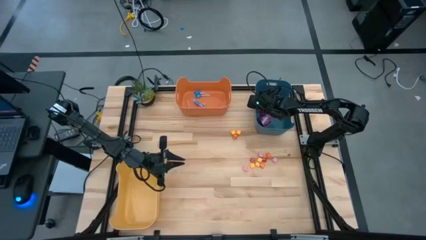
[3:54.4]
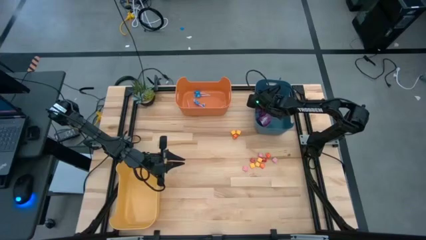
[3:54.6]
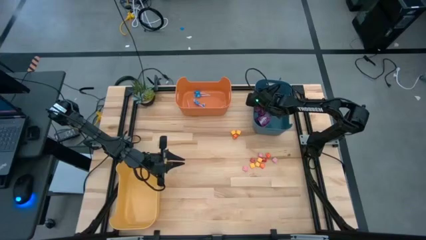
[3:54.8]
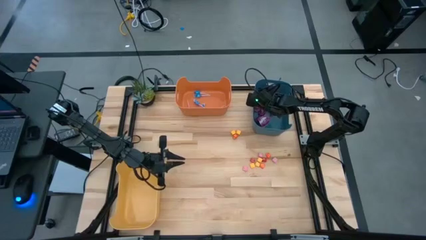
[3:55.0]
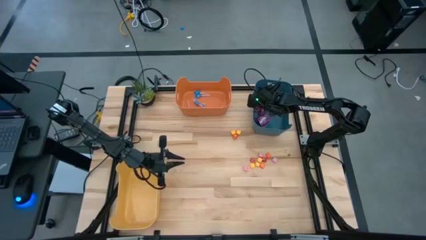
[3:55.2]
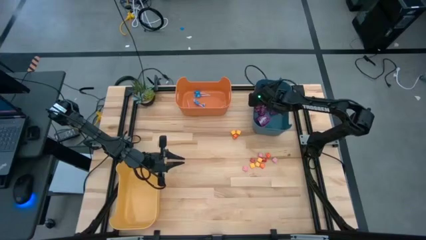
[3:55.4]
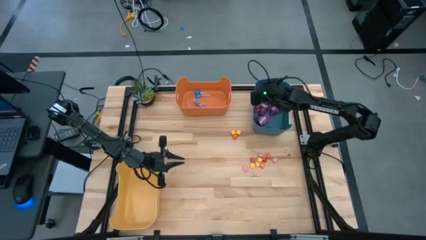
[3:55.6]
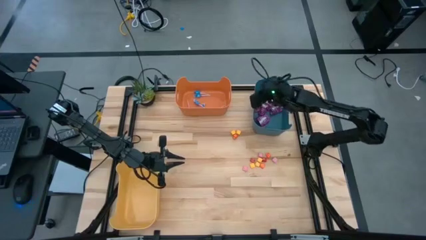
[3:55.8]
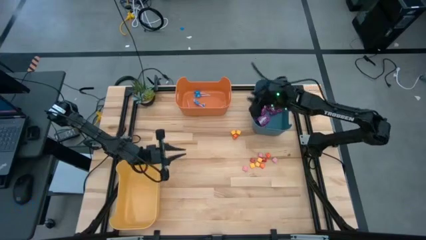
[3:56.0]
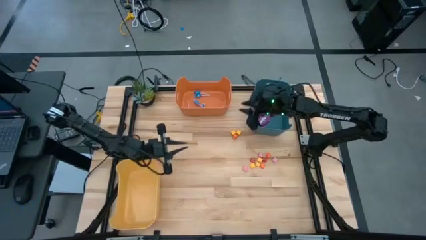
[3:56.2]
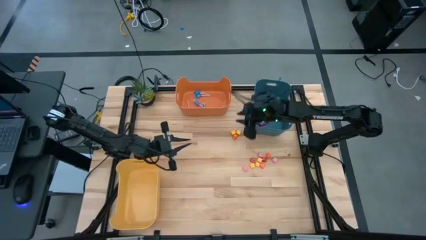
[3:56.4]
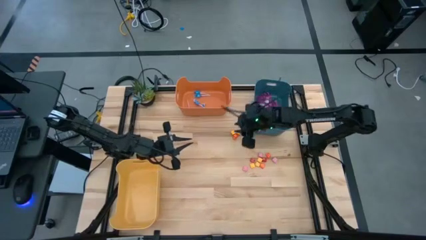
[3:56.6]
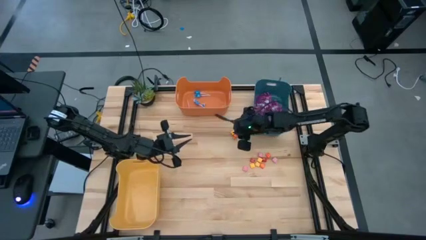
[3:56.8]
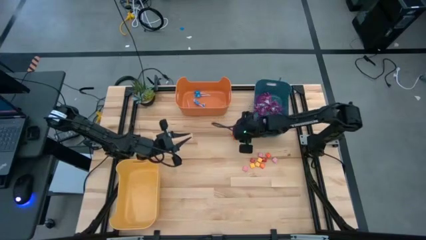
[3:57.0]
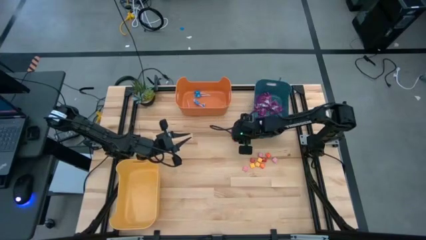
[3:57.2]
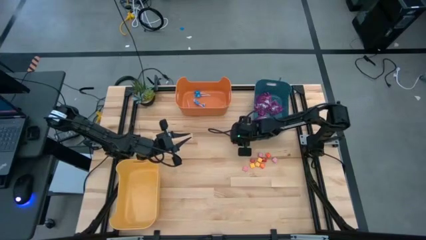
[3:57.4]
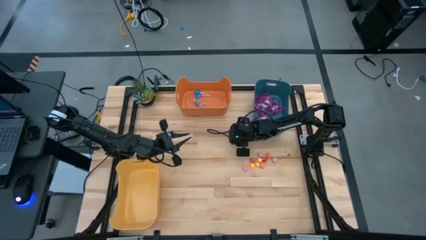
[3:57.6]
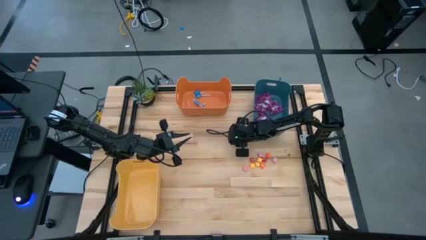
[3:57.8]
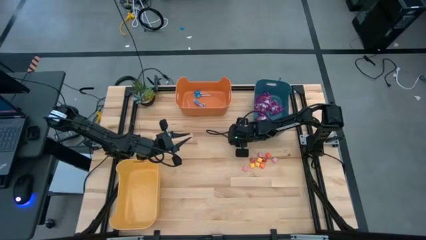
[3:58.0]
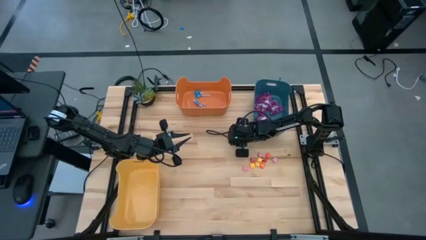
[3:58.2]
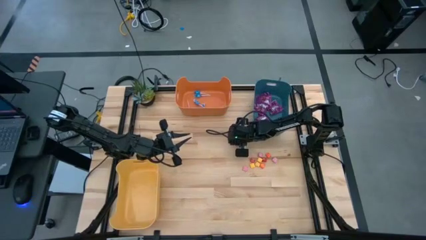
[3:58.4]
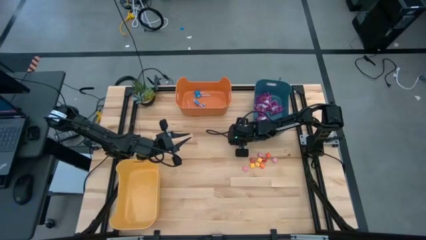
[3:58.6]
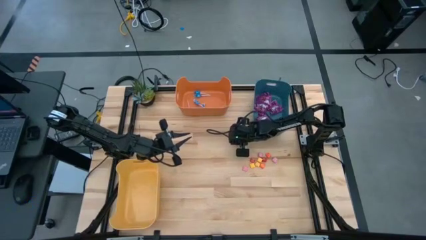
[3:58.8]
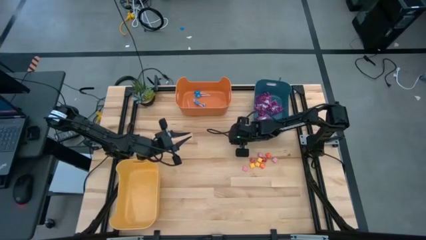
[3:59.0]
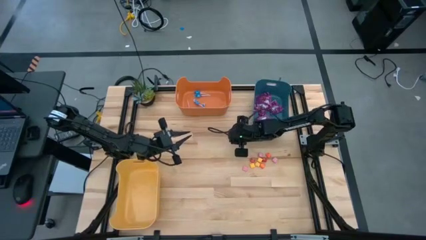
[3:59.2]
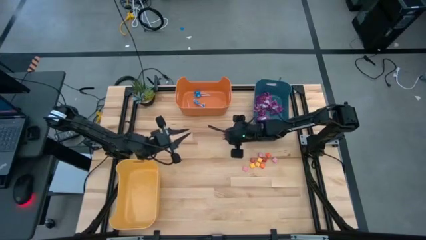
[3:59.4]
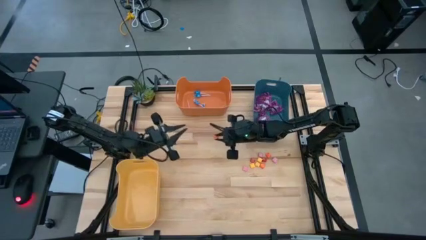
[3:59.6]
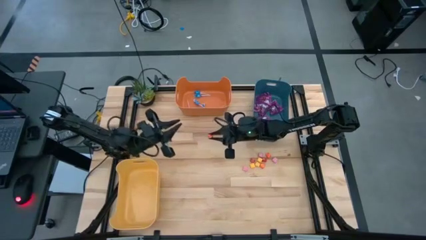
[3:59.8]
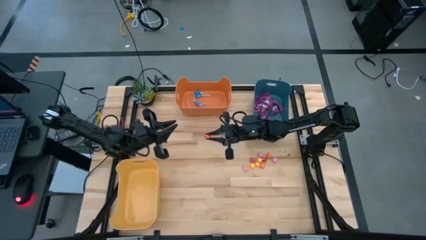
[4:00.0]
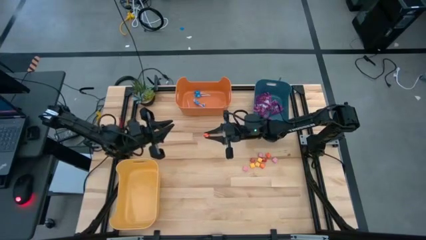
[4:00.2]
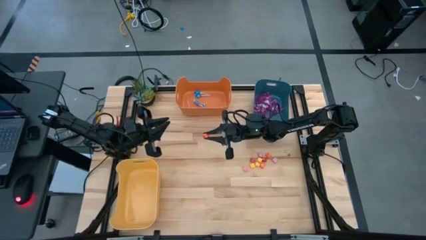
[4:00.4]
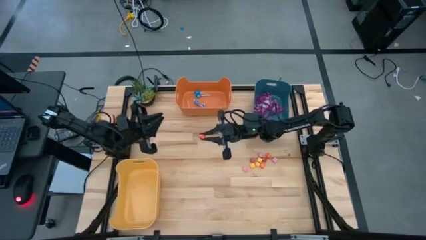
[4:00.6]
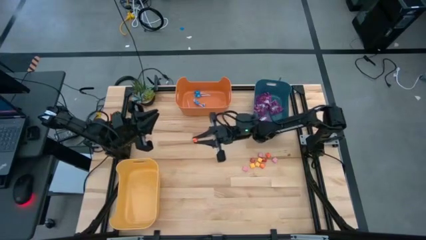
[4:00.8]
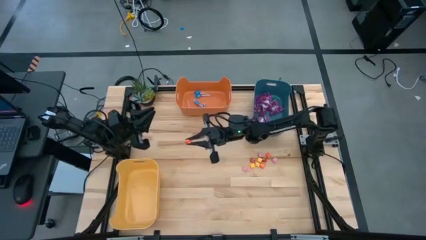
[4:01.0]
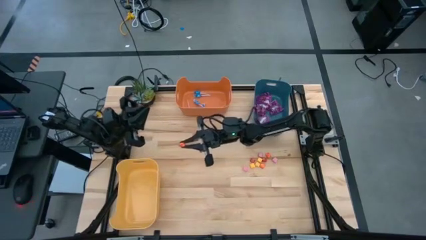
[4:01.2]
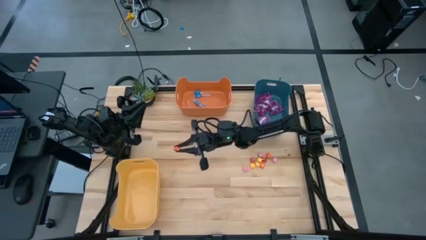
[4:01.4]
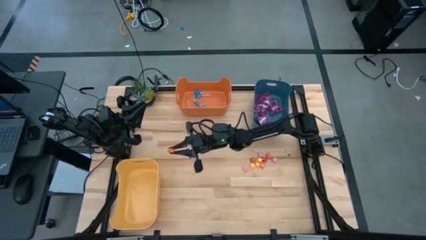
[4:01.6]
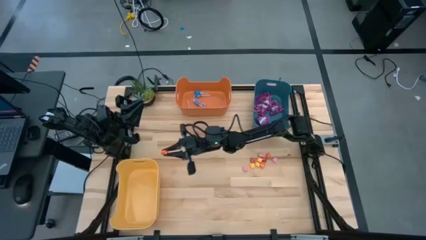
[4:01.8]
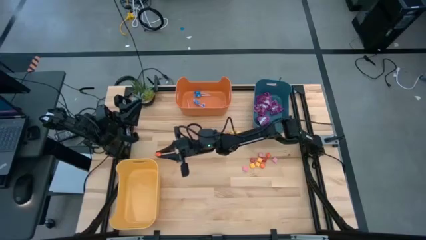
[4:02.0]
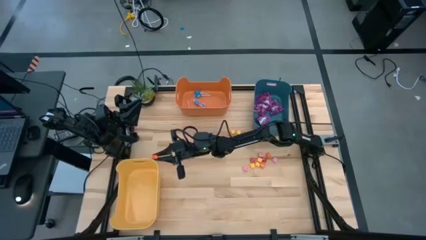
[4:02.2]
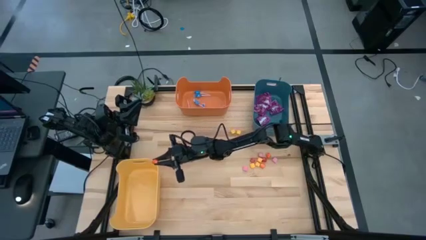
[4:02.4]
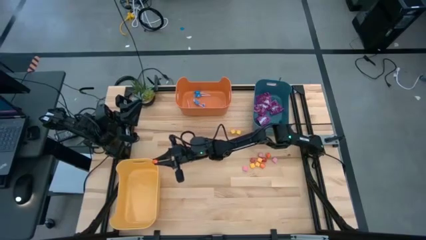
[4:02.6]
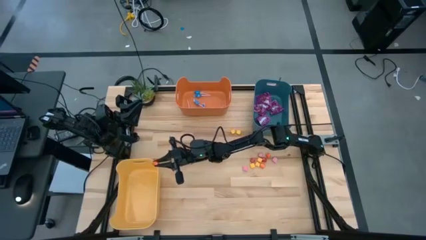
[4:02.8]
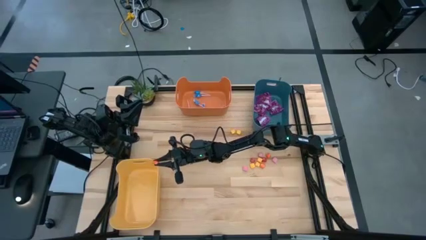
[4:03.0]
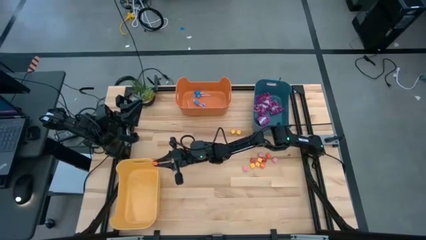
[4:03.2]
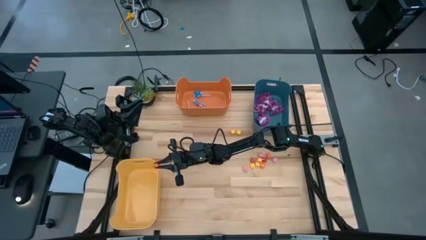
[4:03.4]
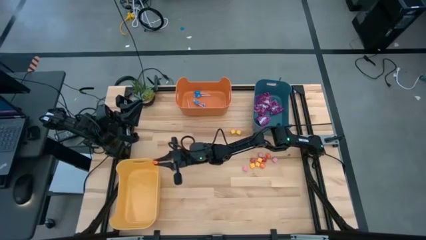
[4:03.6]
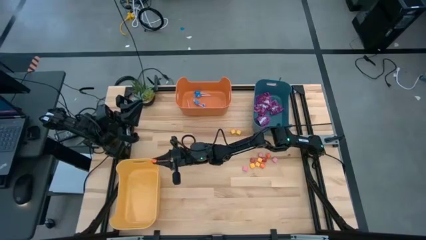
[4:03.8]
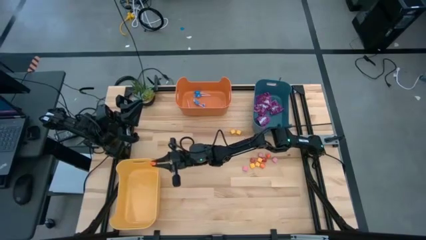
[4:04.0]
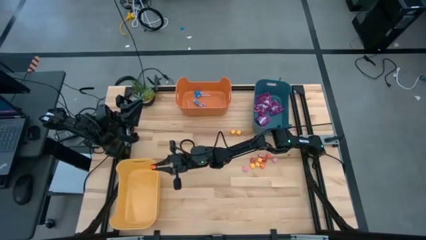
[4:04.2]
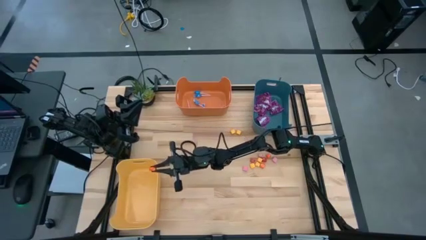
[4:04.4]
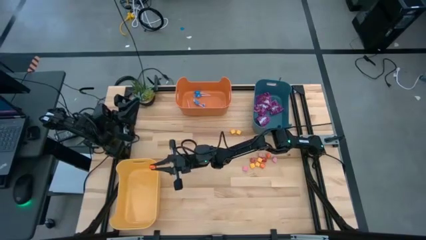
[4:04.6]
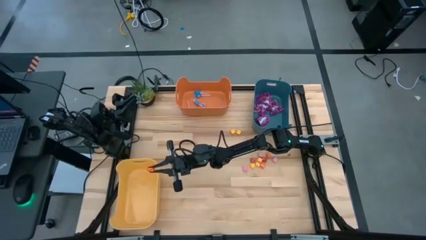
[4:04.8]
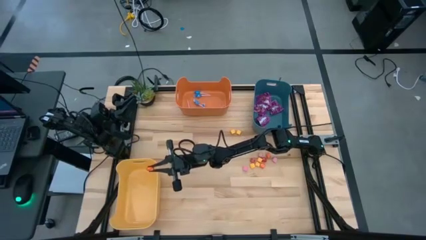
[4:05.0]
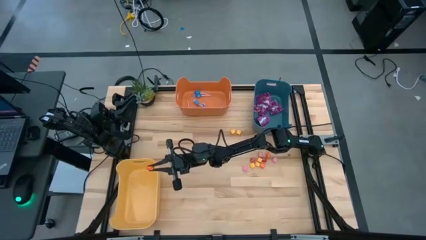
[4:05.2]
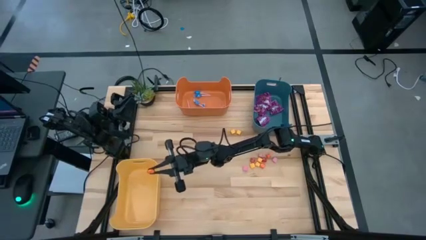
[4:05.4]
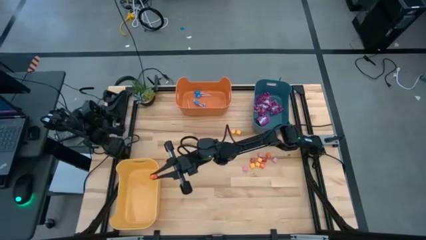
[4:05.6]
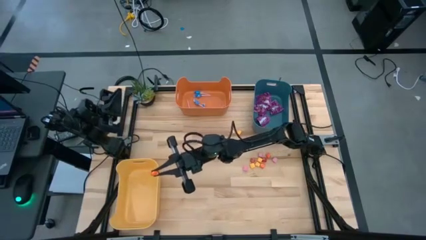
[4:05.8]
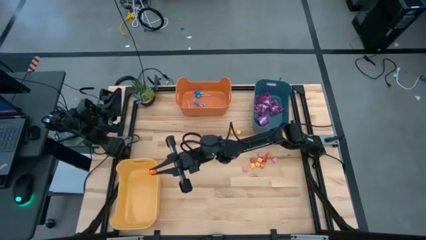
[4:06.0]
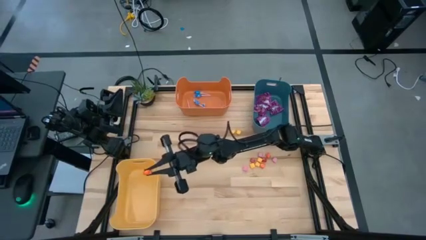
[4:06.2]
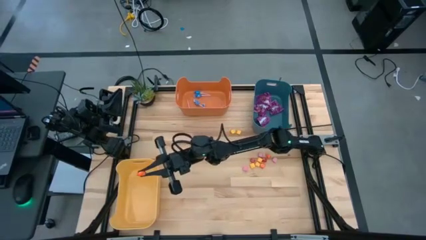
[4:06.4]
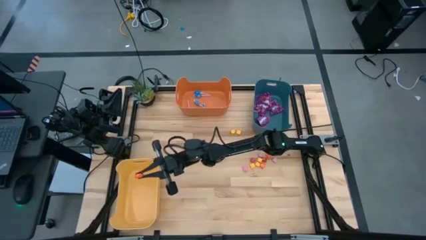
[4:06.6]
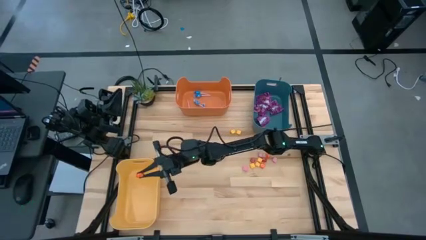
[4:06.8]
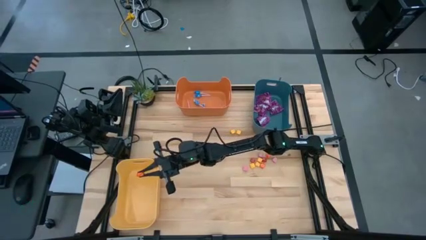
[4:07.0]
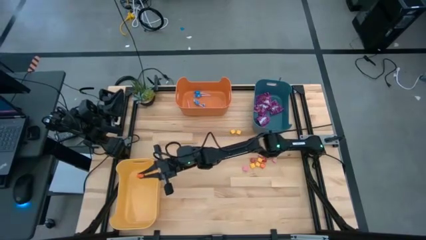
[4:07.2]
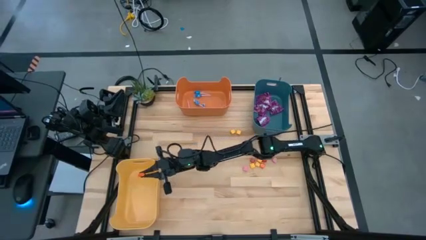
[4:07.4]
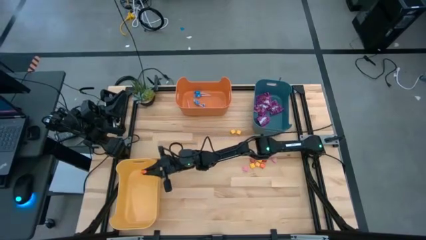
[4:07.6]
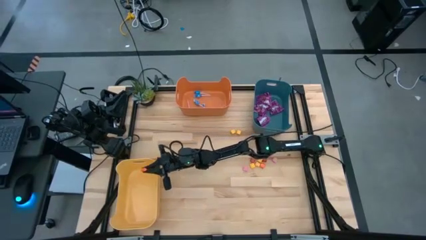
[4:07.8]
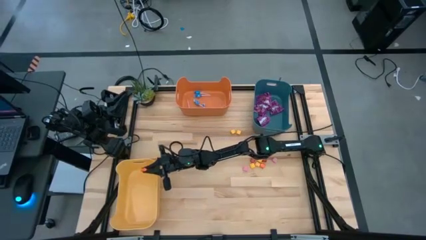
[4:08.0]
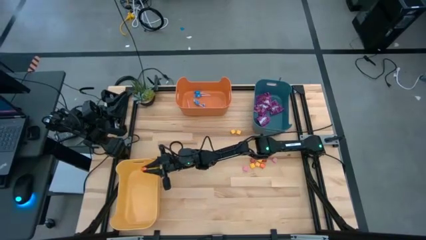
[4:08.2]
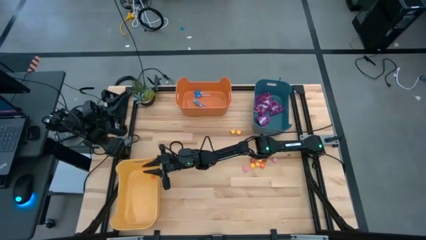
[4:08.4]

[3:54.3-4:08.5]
Task: Sort candy
Put the top orange candy into the yellow bin
